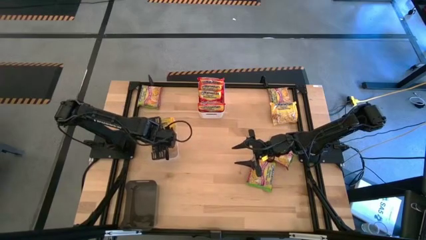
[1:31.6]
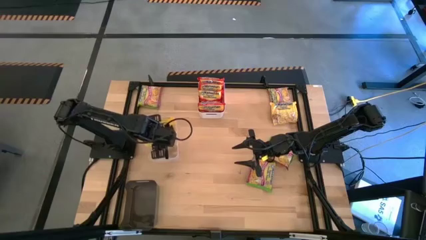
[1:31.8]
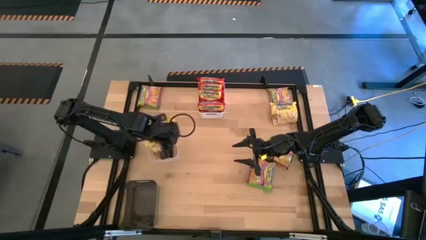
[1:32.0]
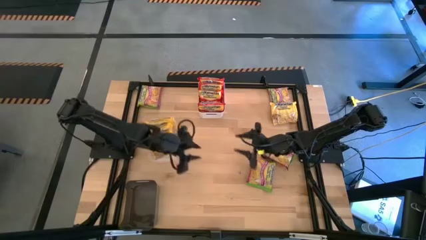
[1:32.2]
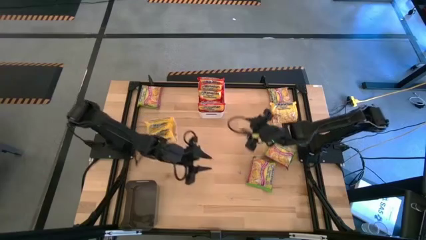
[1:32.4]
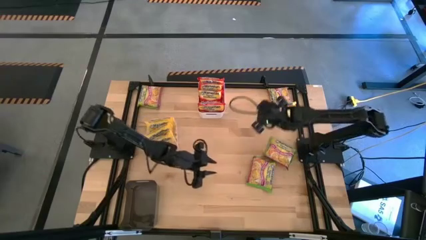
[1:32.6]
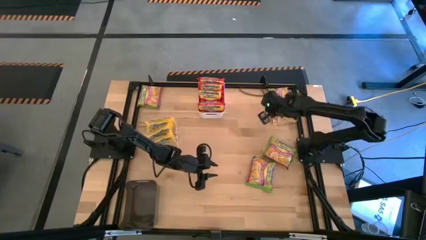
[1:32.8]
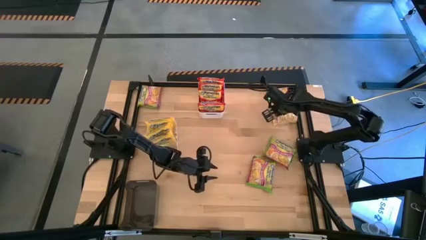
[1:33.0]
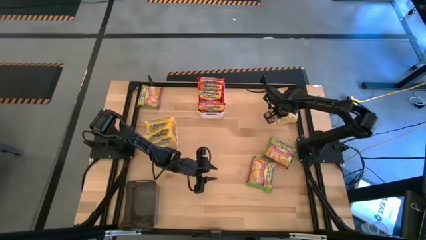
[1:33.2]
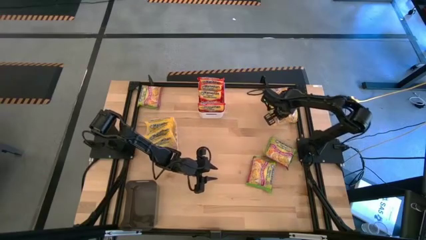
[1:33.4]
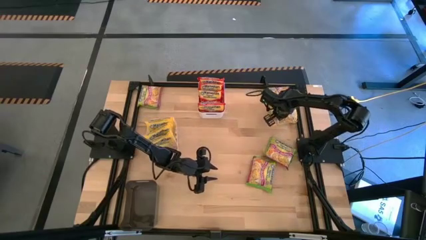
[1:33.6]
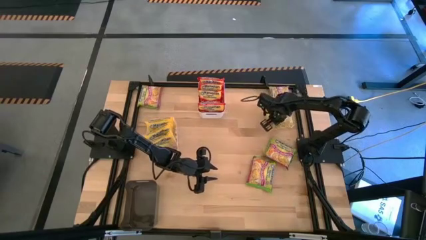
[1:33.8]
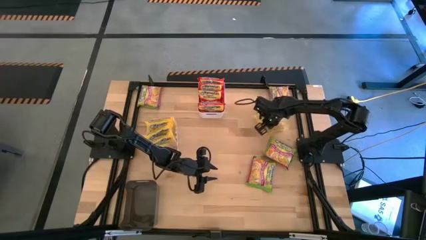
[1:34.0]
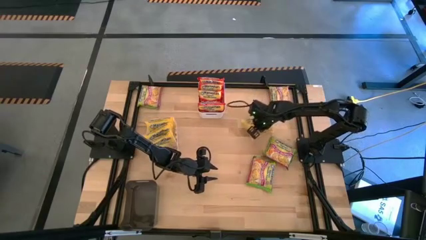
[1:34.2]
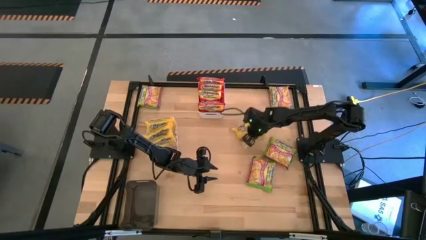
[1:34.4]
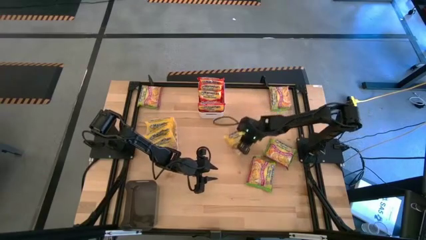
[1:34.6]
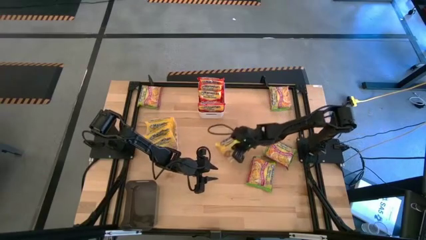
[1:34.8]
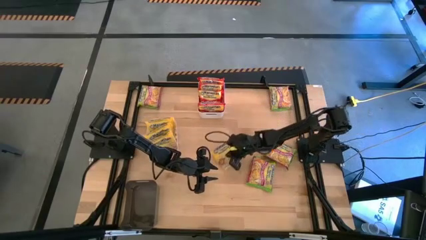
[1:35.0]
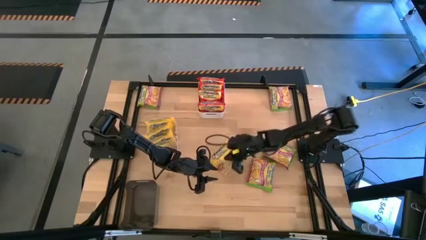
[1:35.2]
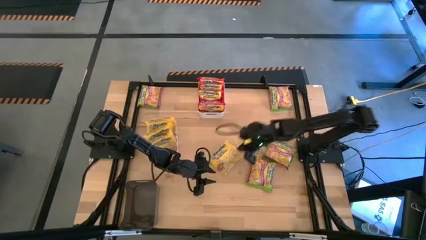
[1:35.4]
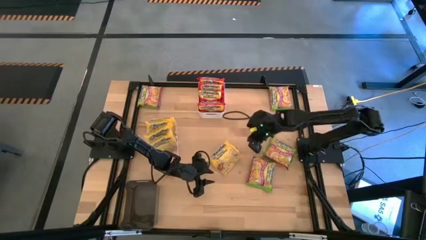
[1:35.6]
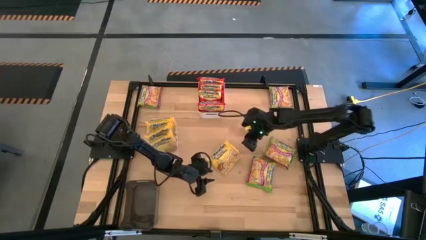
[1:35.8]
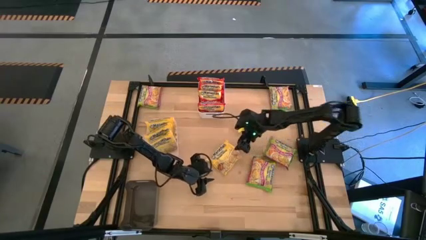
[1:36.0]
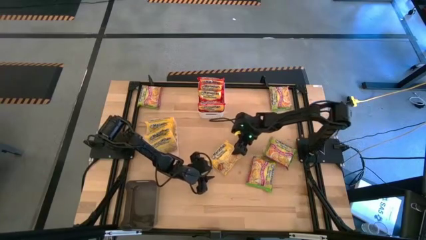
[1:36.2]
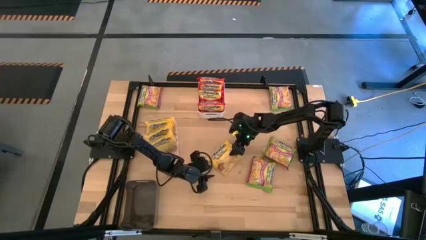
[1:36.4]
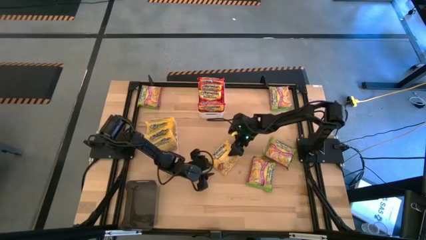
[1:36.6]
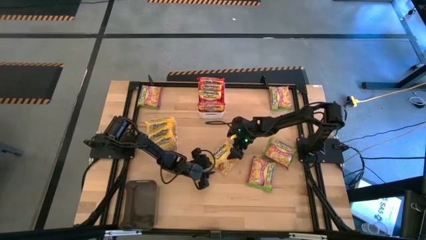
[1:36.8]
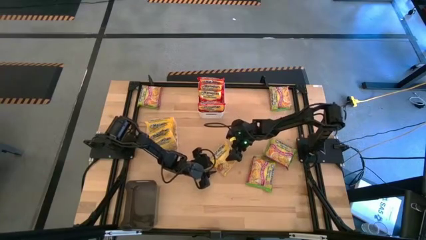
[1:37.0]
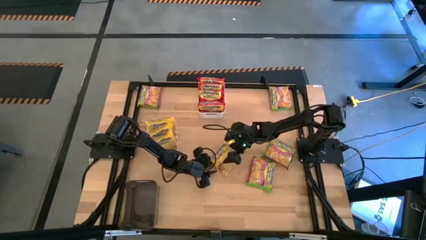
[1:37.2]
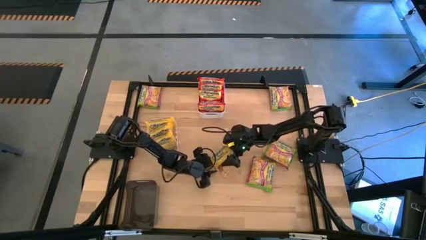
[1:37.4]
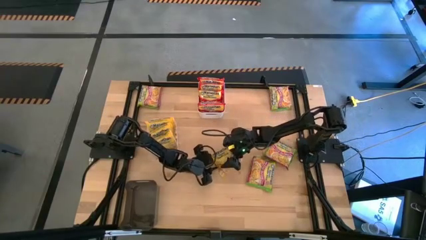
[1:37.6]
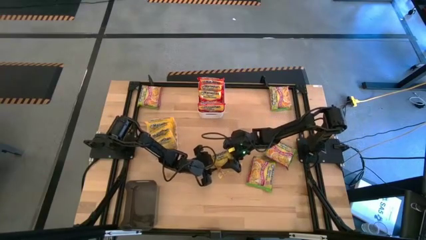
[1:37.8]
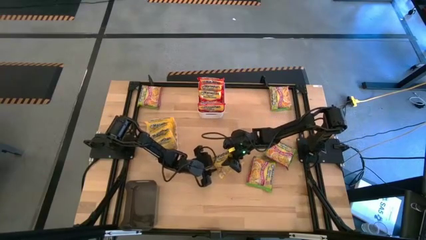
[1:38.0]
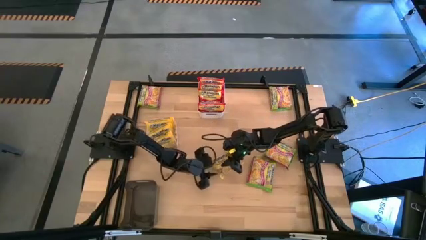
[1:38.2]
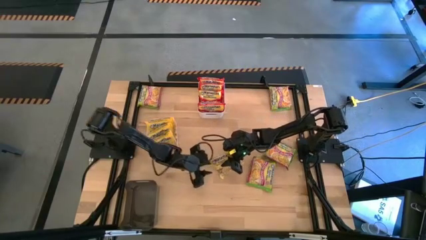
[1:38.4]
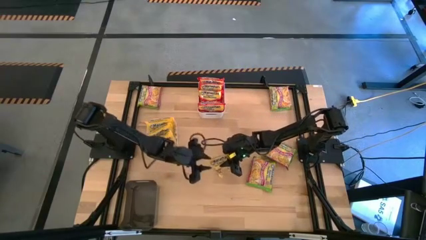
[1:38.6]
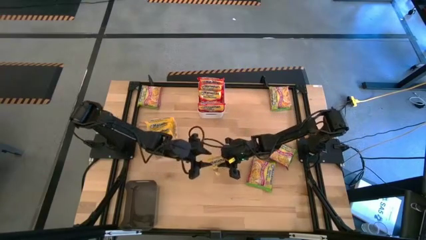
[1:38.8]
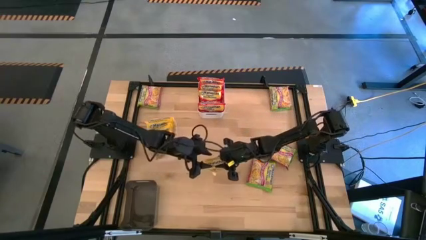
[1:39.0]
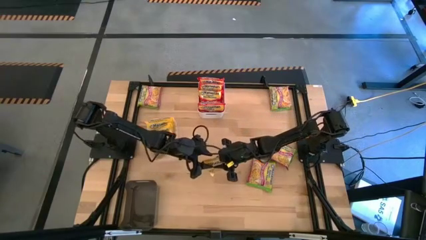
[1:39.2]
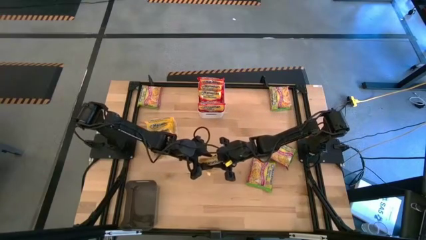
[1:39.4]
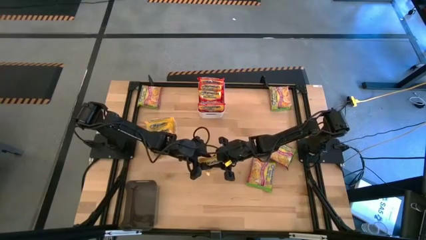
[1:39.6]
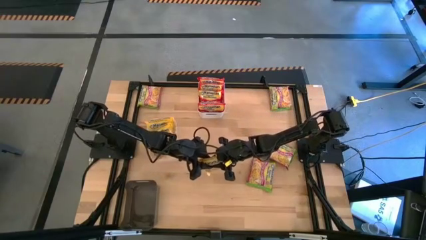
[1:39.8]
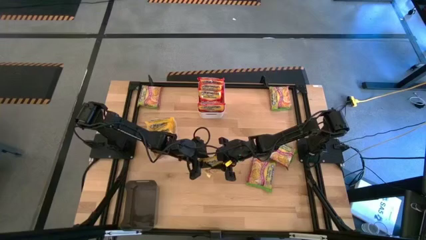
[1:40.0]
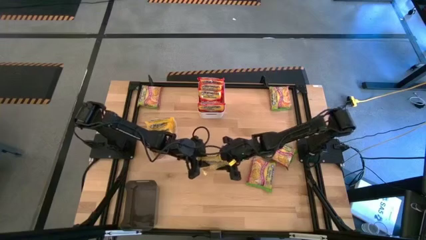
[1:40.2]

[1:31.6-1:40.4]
Task: Sort Maruchan noodles
Put the yellow noodle pack into the transparent bin

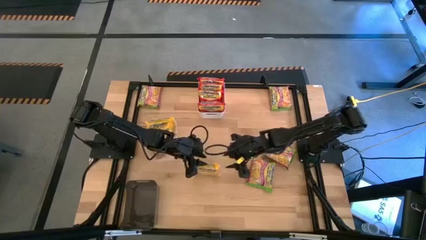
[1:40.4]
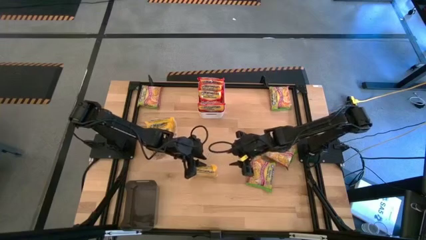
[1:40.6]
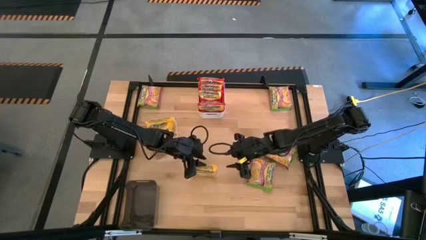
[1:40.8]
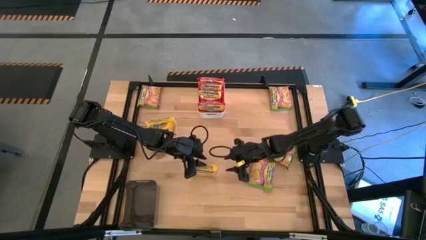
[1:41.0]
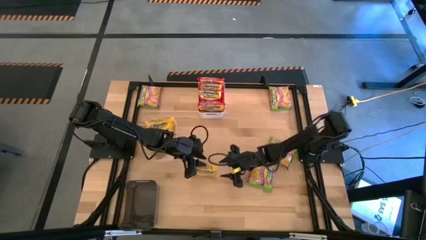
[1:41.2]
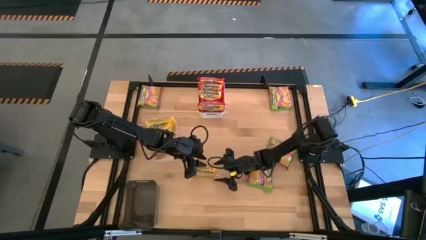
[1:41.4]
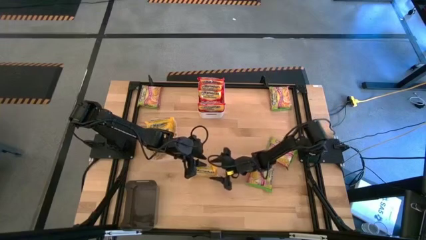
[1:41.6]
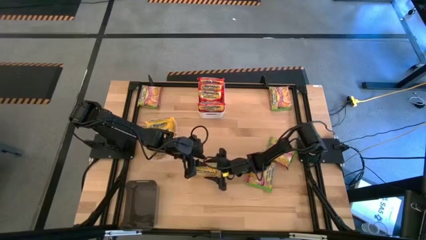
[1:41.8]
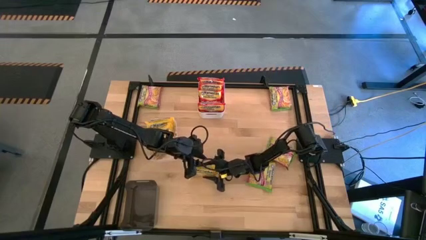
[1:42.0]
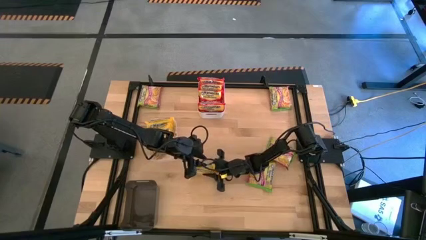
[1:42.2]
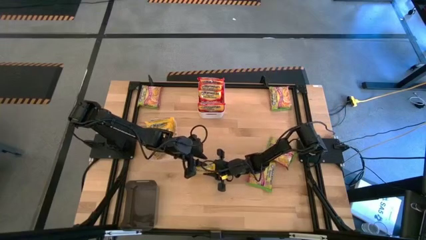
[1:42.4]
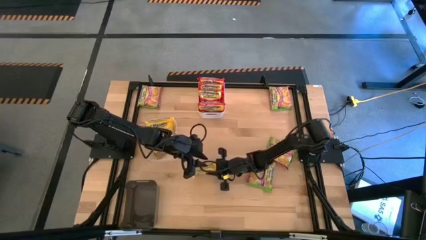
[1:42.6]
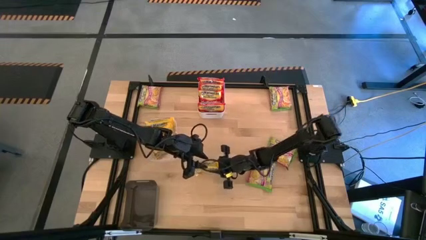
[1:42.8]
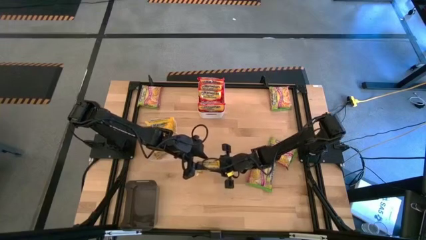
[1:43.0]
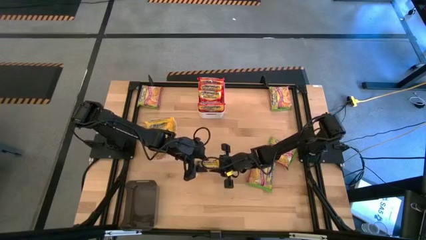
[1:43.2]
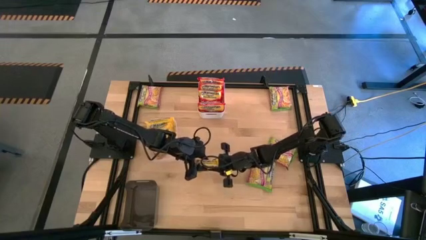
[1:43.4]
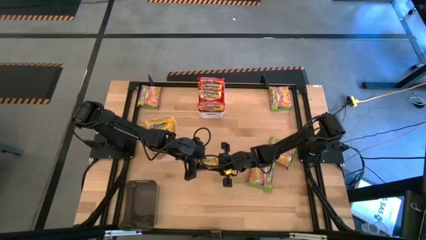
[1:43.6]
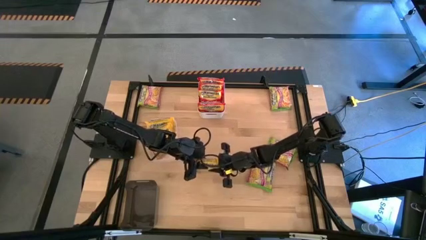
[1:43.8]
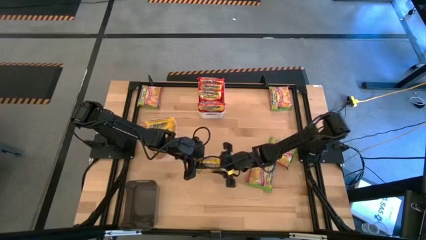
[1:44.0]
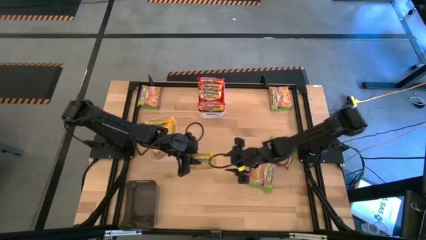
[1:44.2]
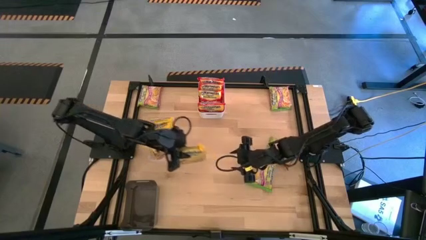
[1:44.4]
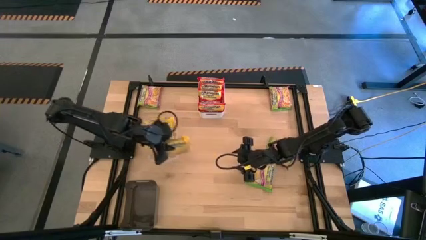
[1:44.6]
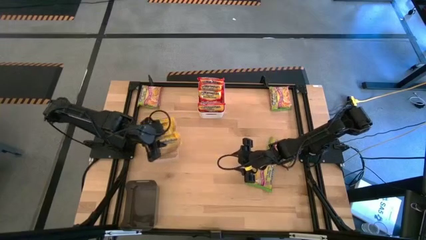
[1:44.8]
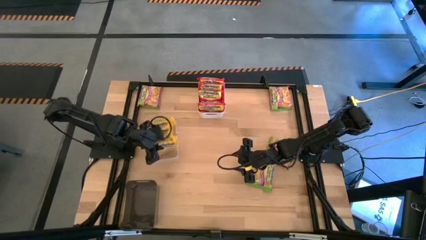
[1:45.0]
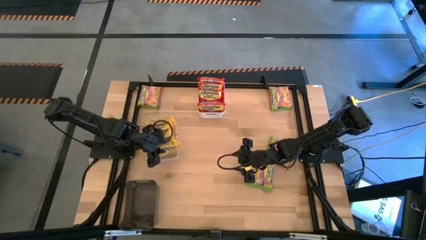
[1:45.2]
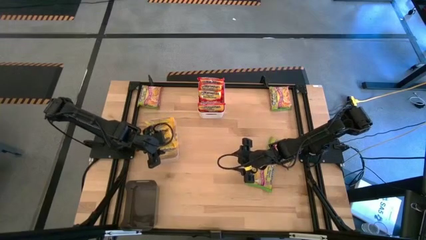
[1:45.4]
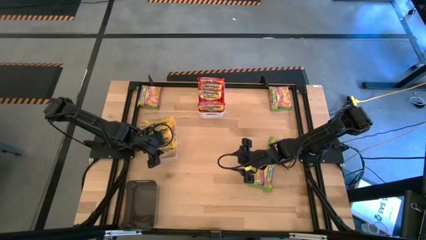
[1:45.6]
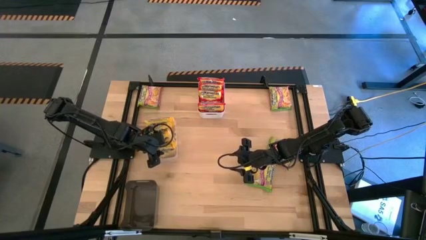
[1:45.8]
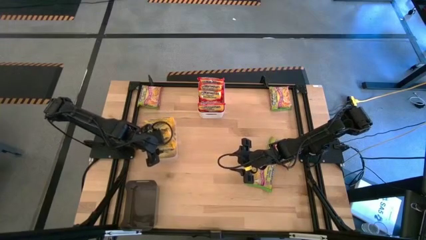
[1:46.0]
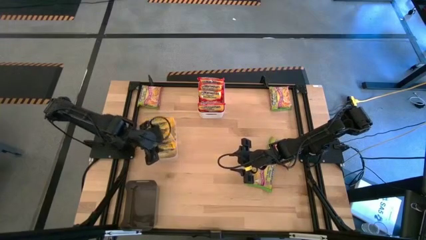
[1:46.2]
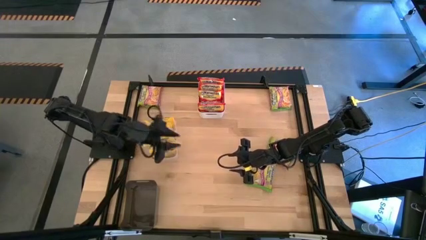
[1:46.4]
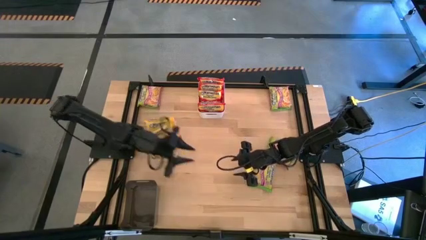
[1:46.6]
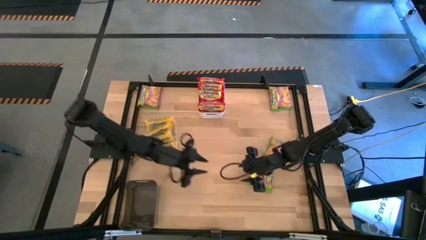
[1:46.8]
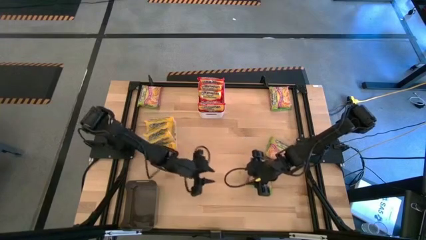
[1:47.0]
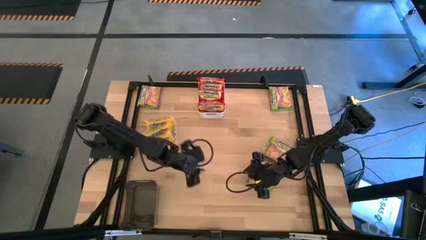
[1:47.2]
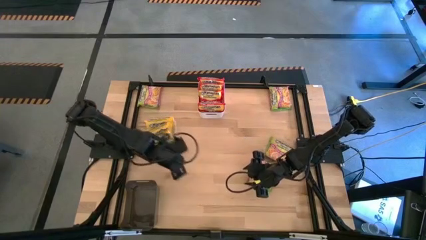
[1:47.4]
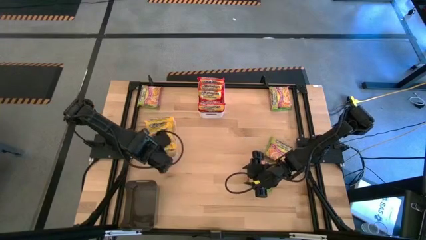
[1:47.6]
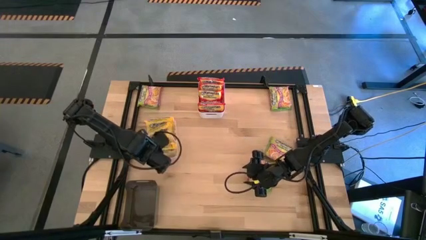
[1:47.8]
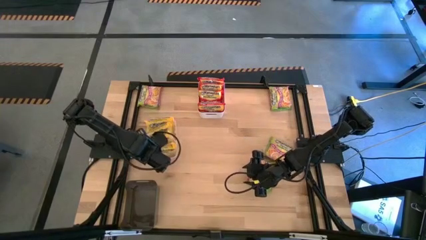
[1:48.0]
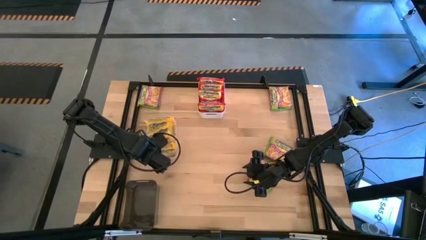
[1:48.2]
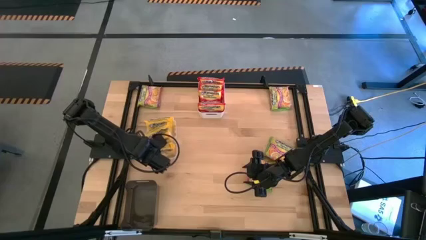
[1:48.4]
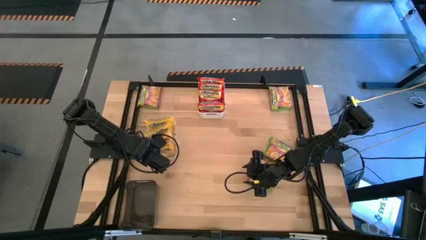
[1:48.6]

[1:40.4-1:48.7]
Put the yellow noodle pack into the transparent bin
